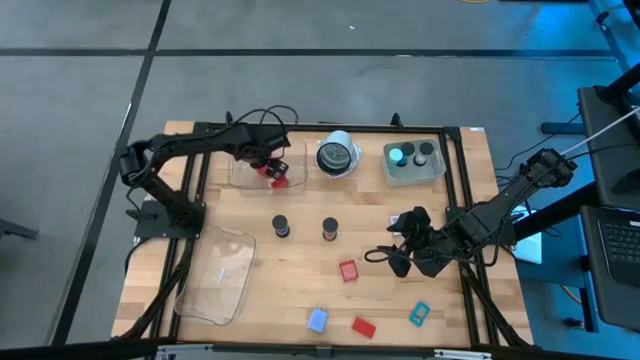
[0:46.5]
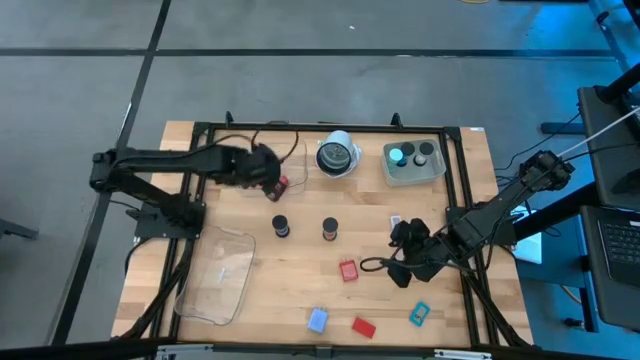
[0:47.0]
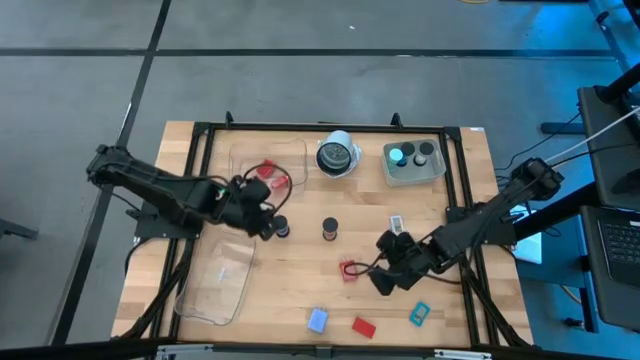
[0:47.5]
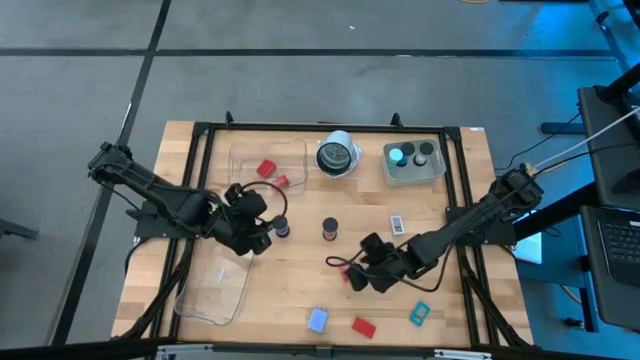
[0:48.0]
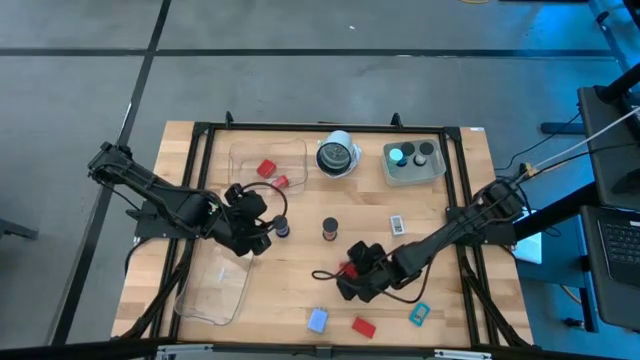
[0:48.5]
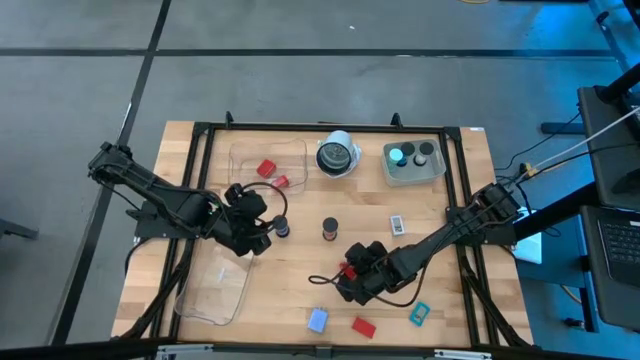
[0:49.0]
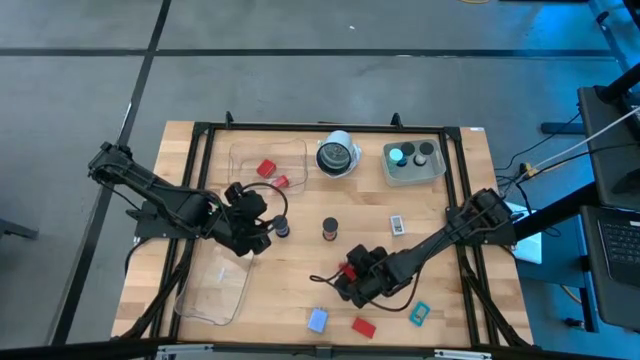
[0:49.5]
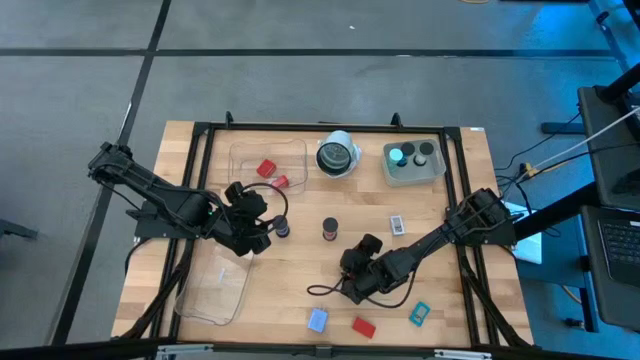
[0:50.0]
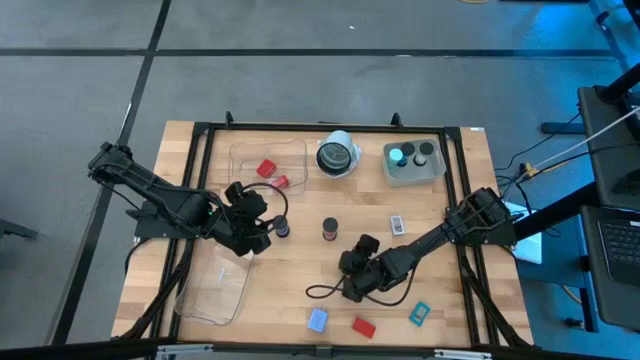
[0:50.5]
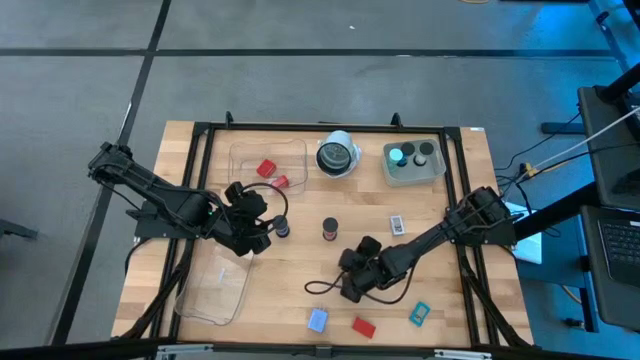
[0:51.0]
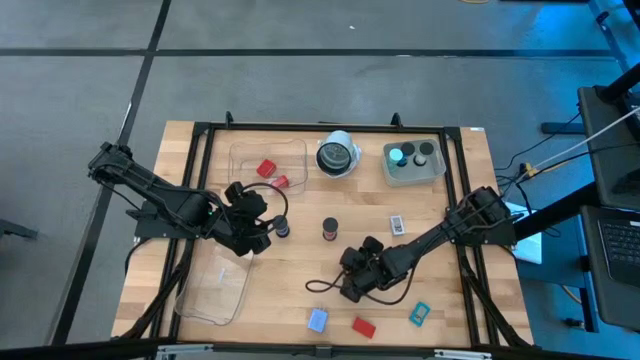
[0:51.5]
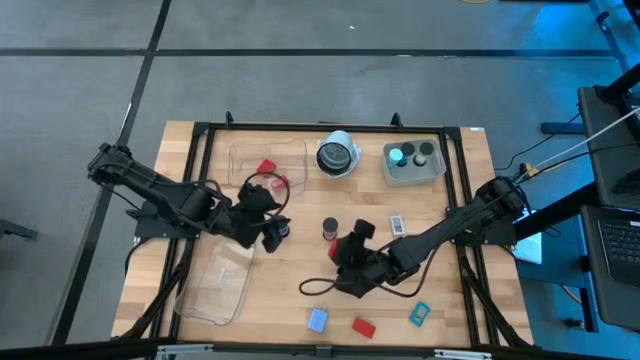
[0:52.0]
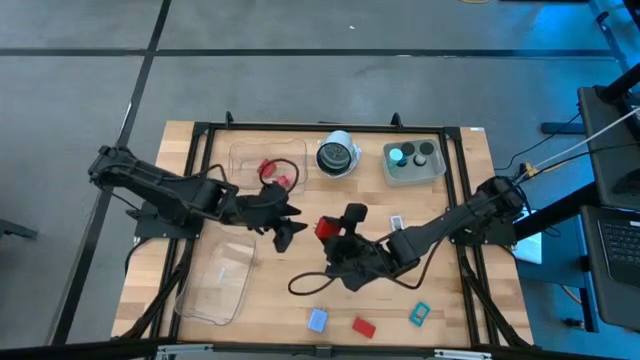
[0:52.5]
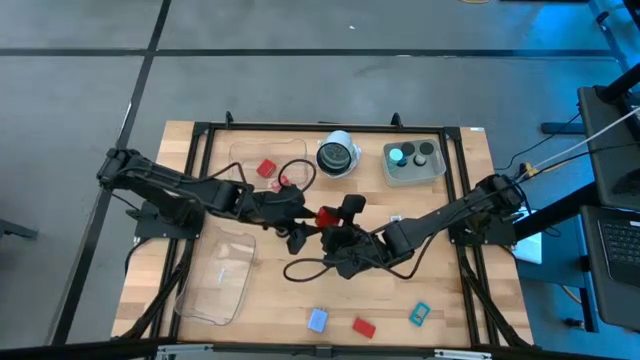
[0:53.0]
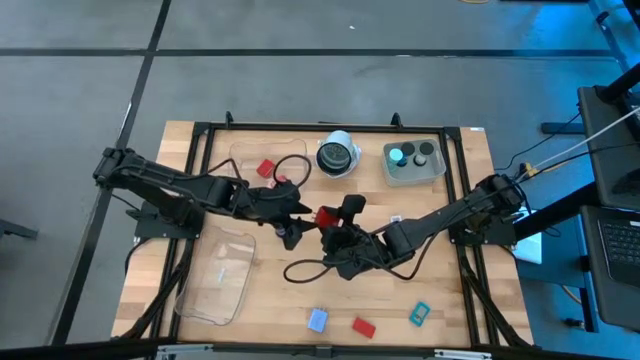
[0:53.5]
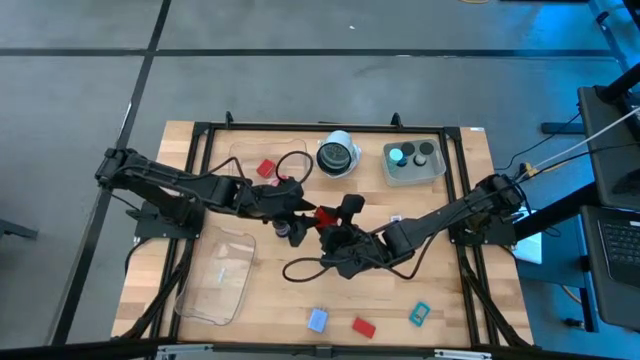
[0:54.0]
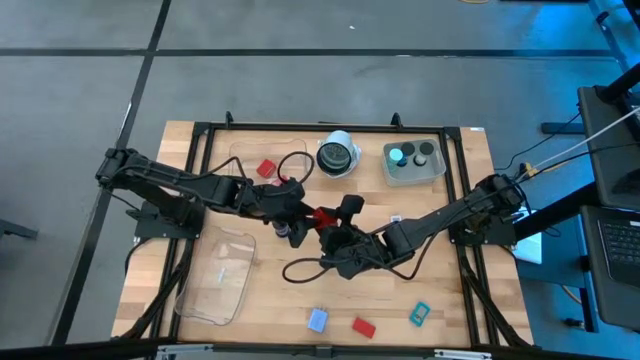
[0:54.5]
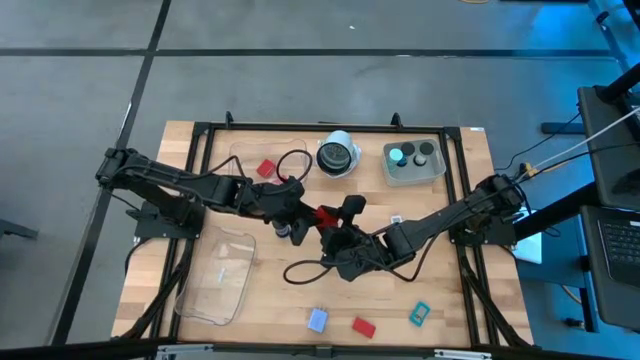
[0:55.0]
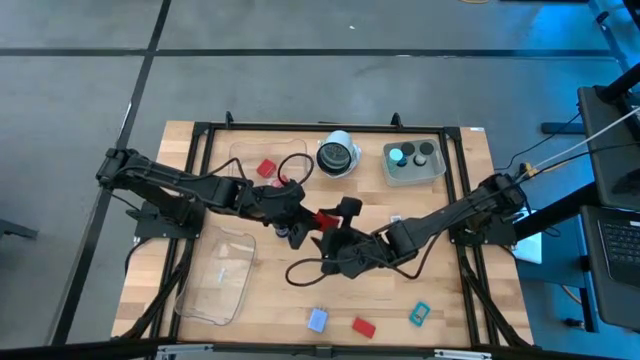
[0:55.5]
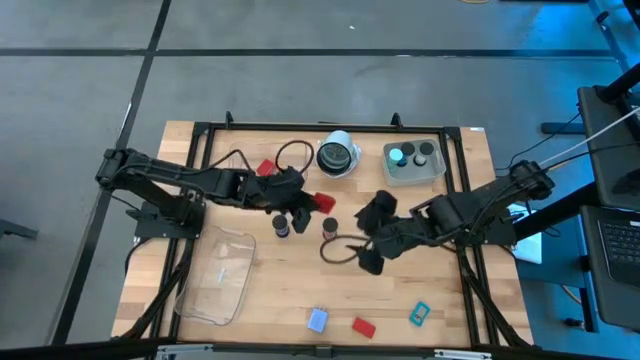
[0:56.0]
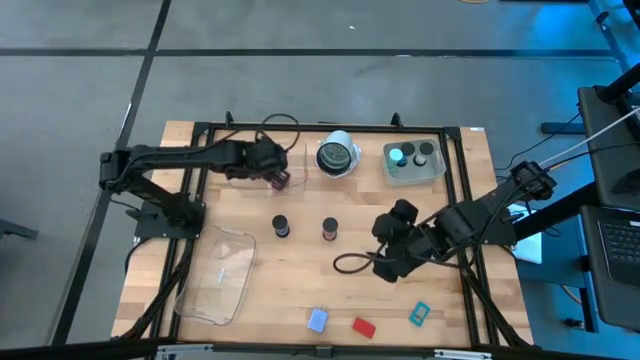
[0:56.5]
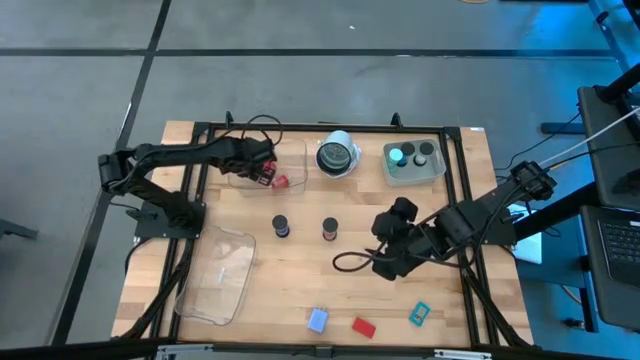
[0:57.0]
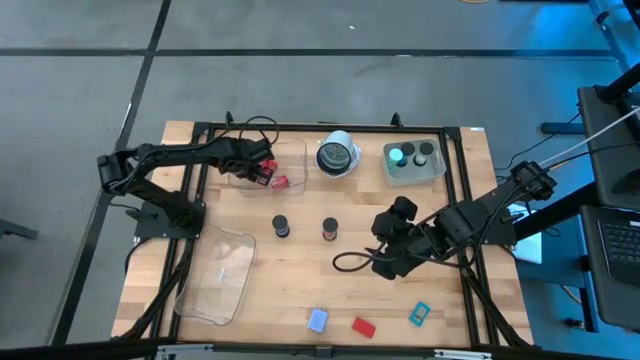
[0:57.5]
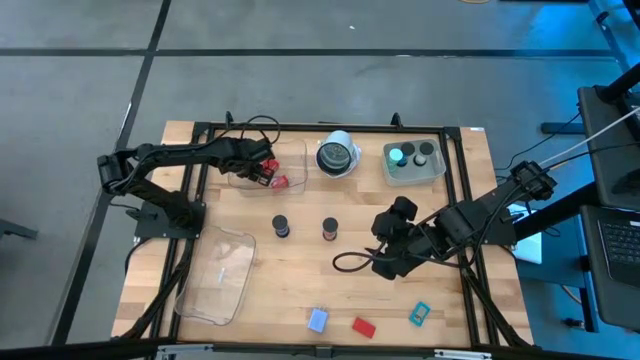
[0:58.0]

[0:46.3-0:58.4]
Task: Pick & Place Office items
Put the red charger adapter into the top transparent bin

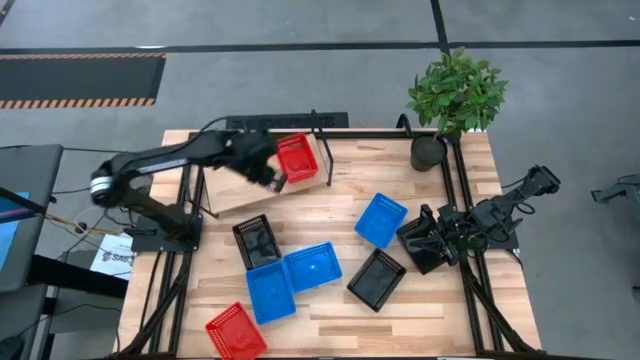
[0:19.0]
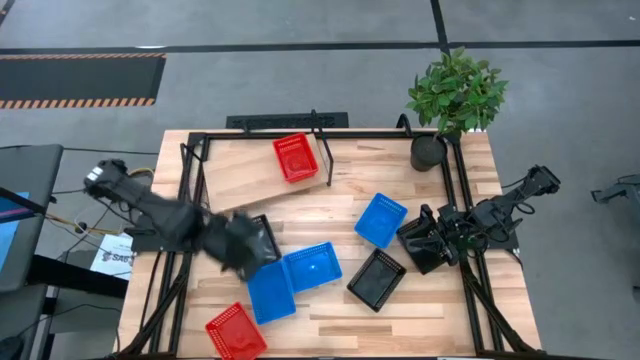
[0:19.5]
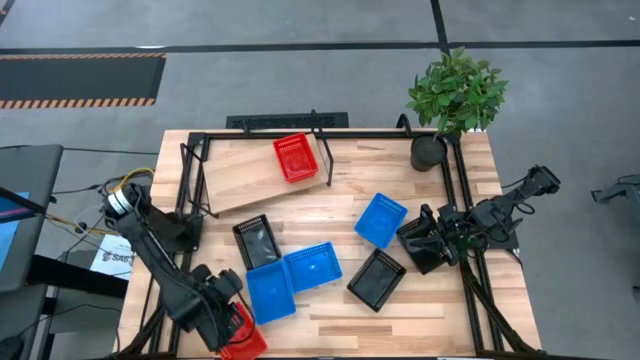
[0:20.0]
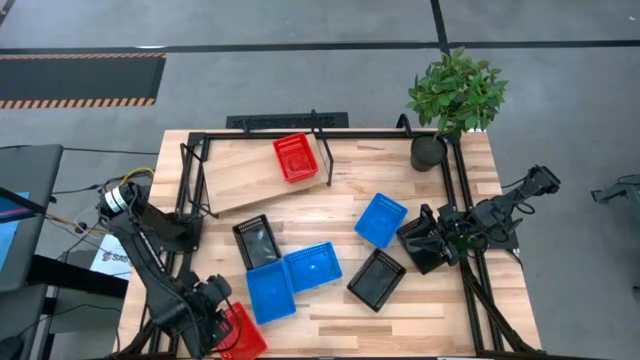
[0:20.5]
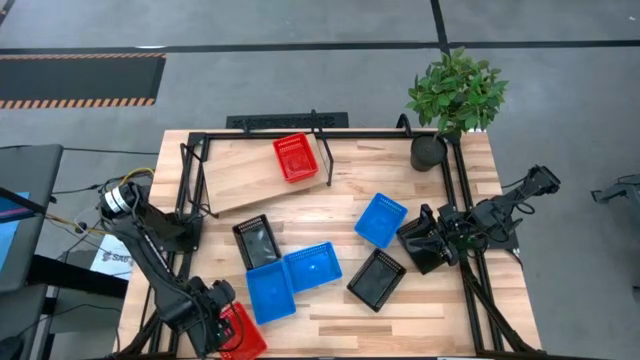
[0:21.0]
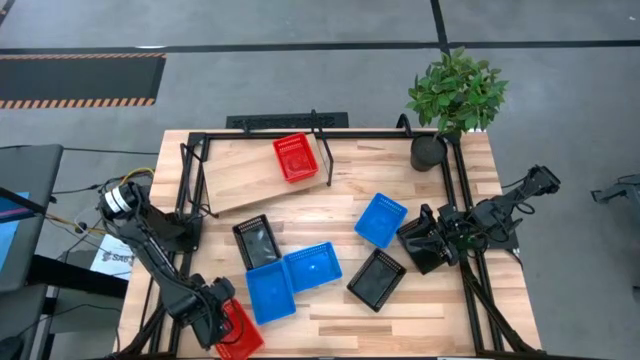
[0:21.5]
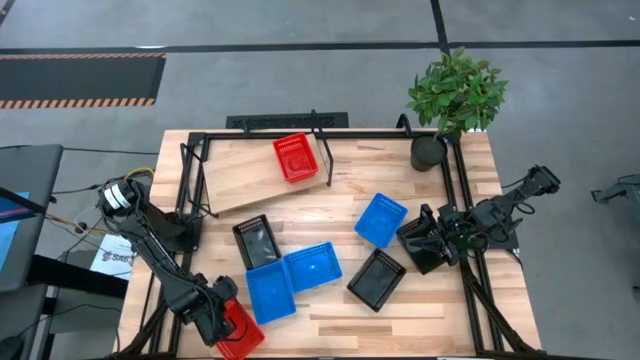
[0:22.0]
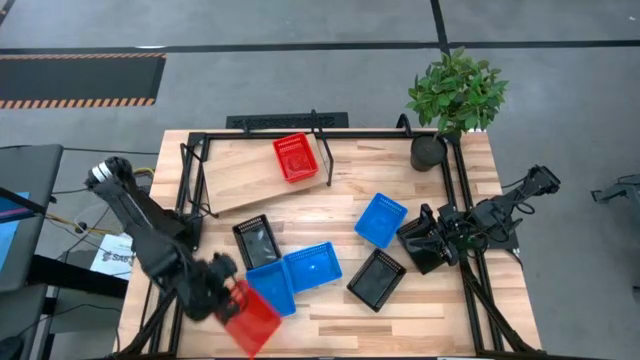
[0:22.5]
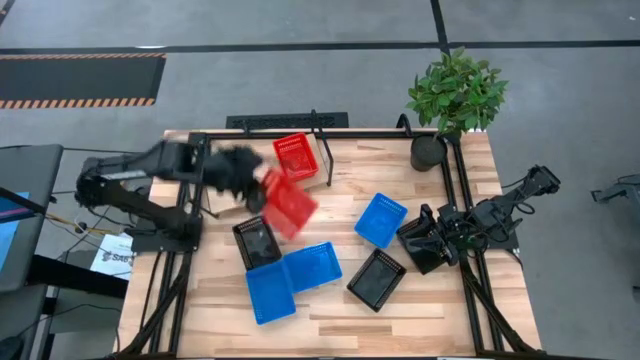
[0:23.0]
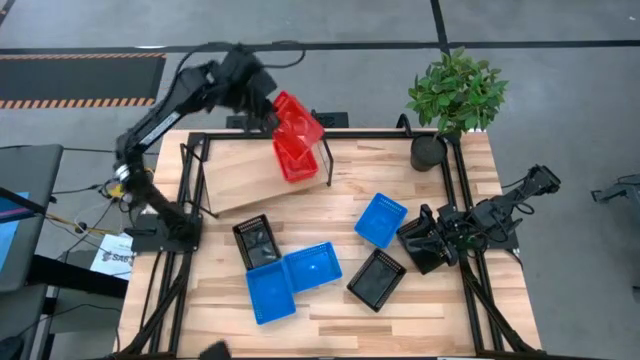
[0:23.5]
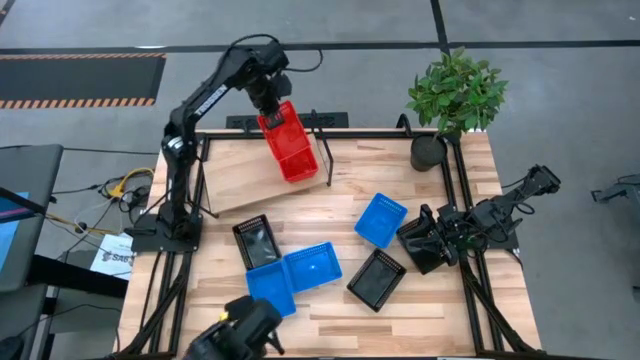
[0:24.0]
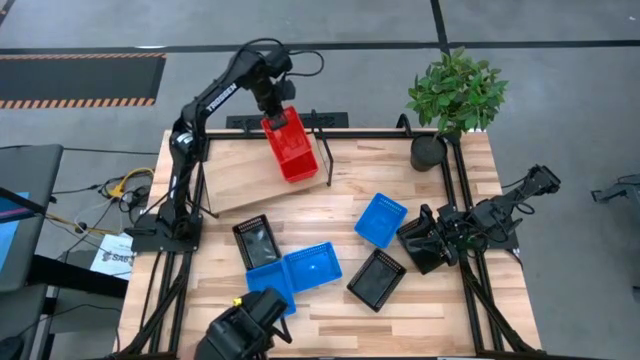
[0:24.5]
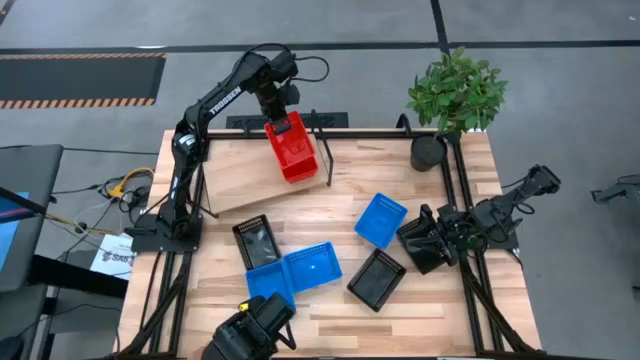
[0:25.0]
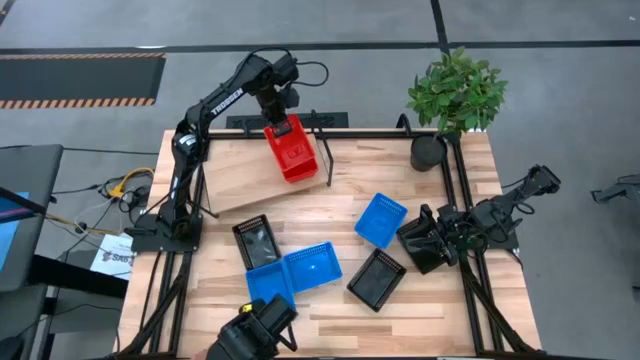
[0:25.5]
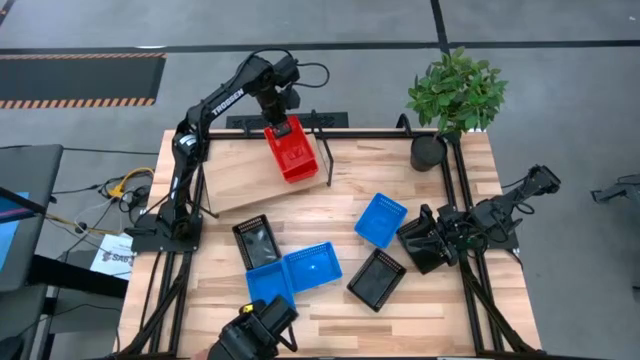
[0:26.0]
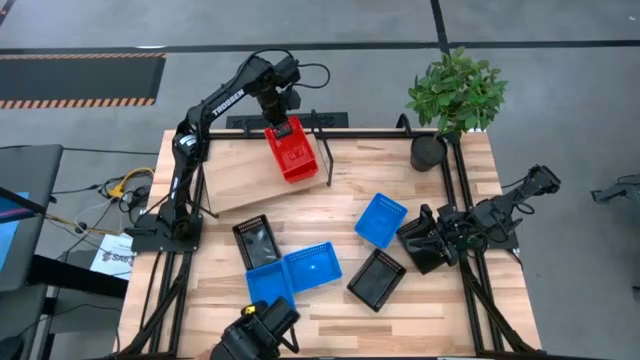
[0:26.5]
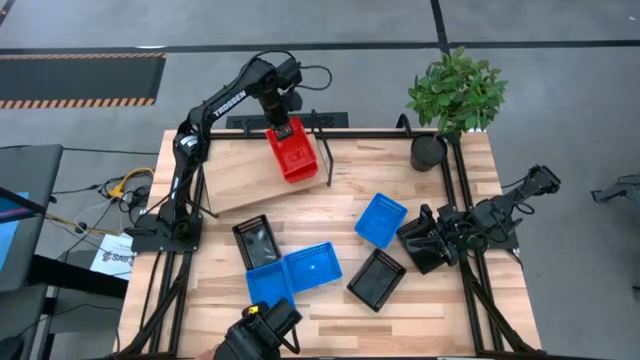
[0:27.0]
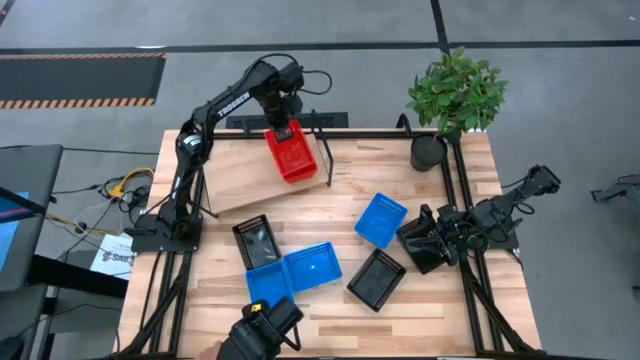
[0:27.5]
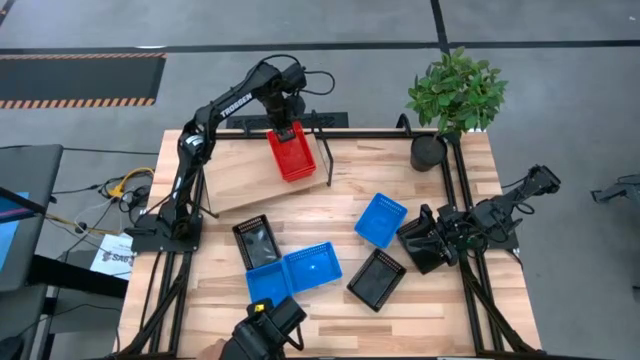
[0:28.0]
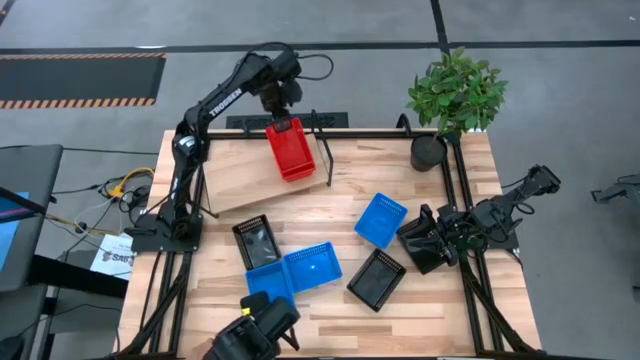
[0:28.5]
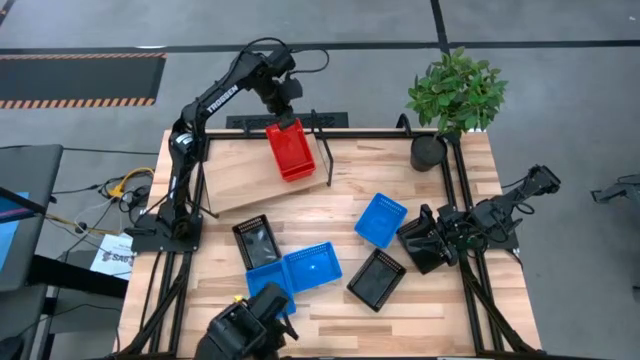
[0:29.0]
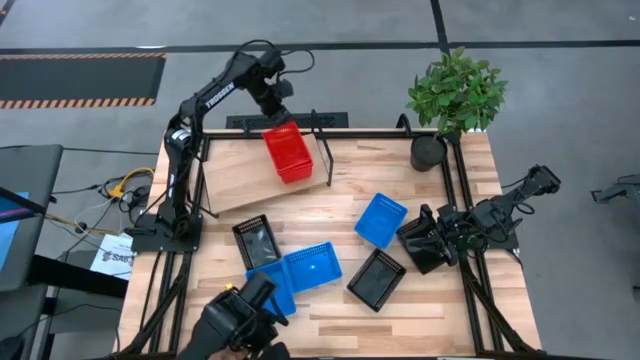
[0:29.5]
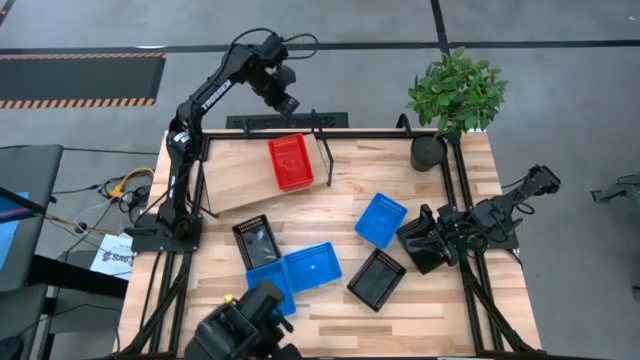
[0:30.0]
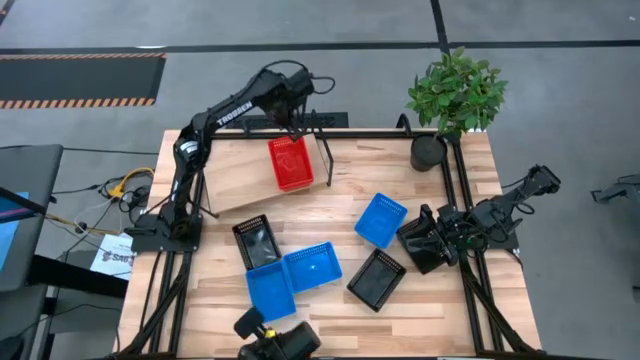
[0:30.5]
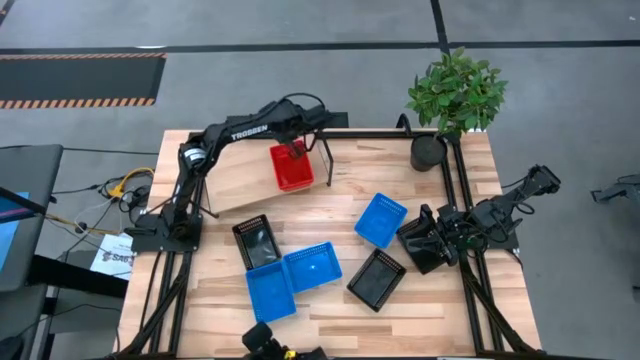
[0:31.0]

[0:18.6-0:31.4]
Task: Stack baskets on shelf by color
Stack the red bin on top of the red bin on the shelf
